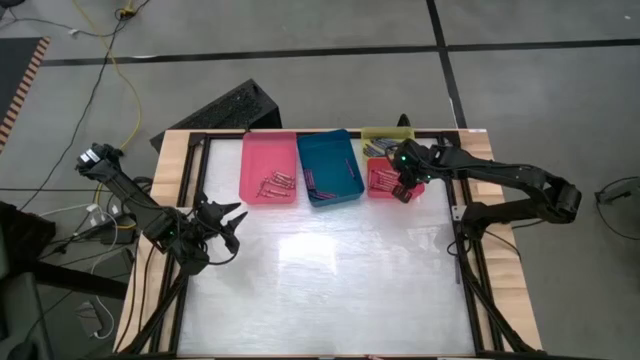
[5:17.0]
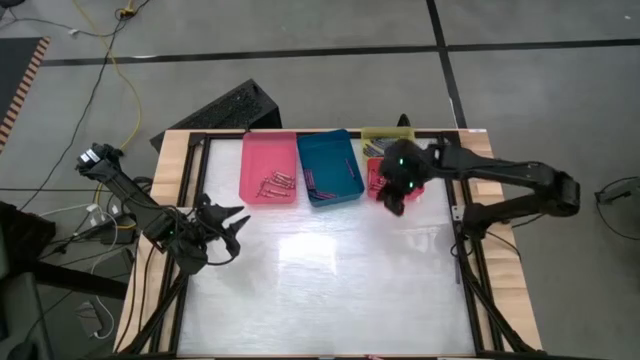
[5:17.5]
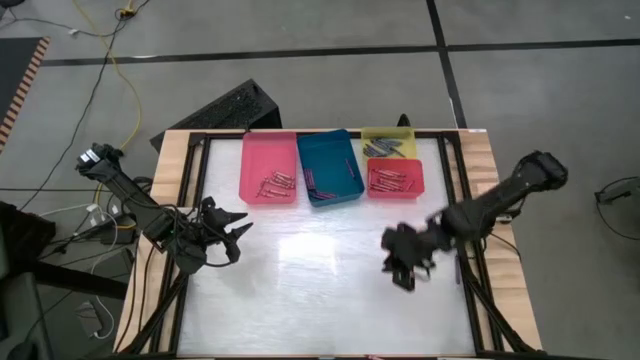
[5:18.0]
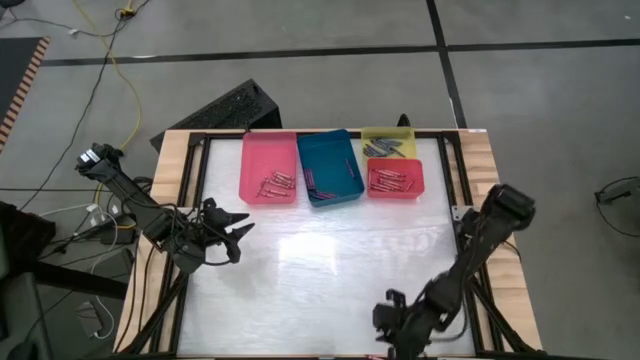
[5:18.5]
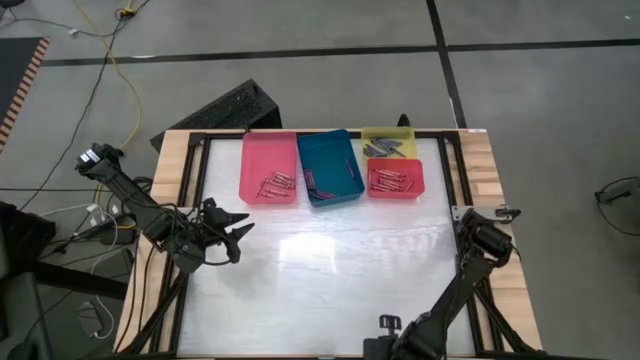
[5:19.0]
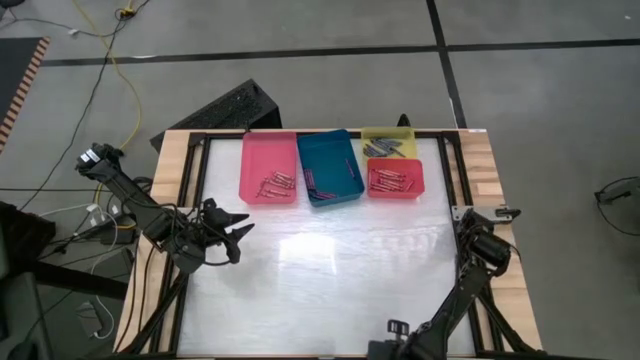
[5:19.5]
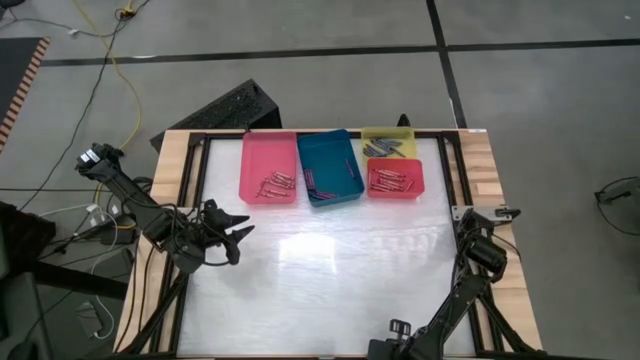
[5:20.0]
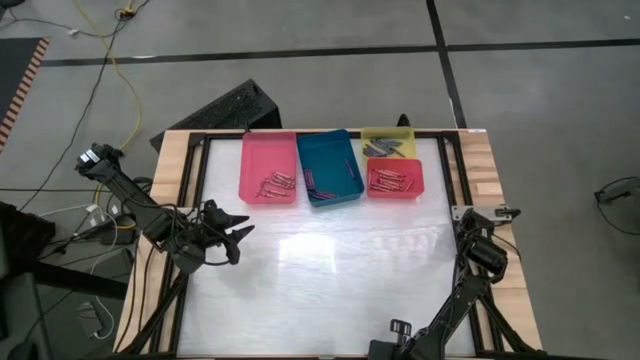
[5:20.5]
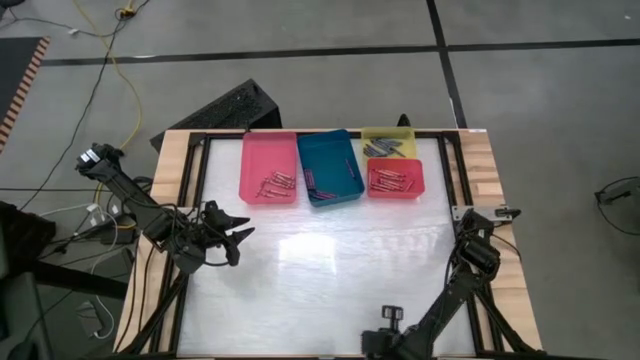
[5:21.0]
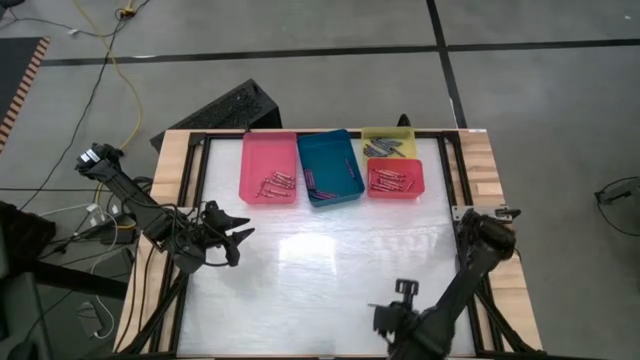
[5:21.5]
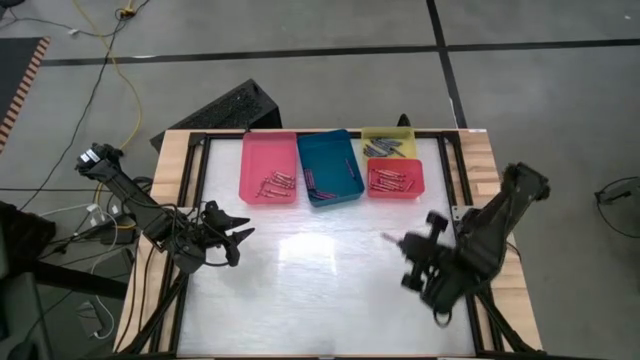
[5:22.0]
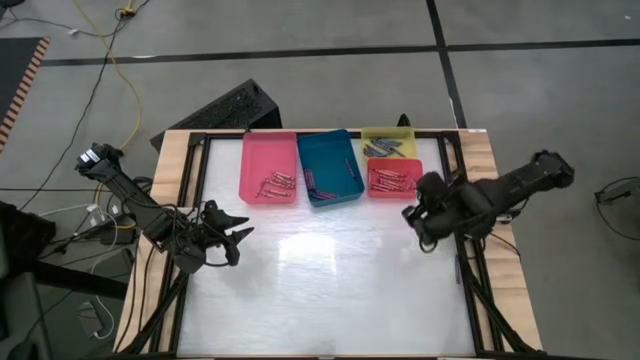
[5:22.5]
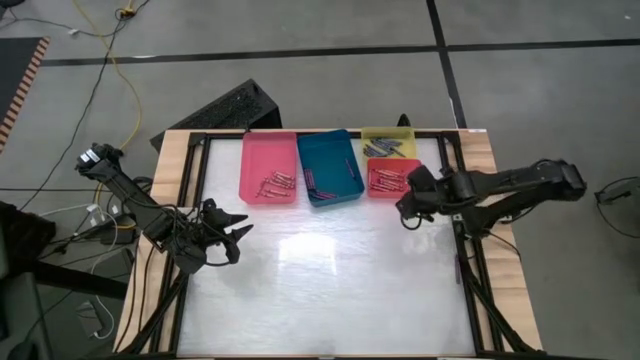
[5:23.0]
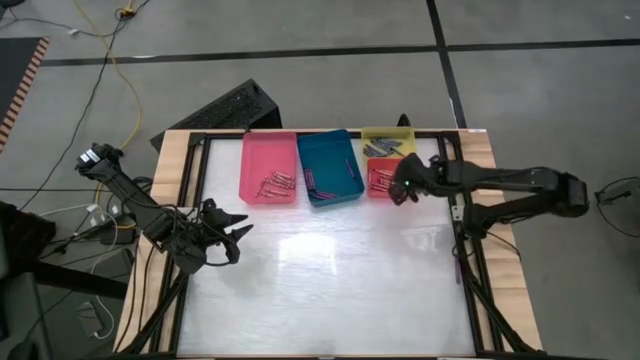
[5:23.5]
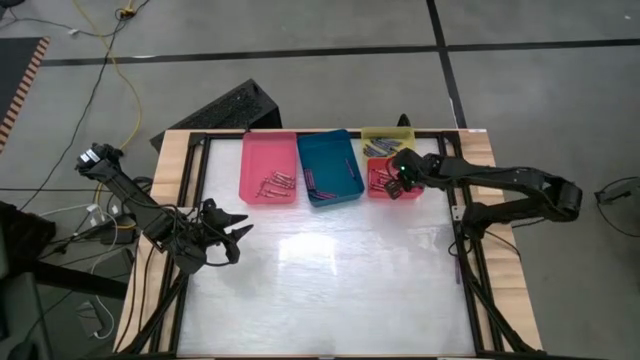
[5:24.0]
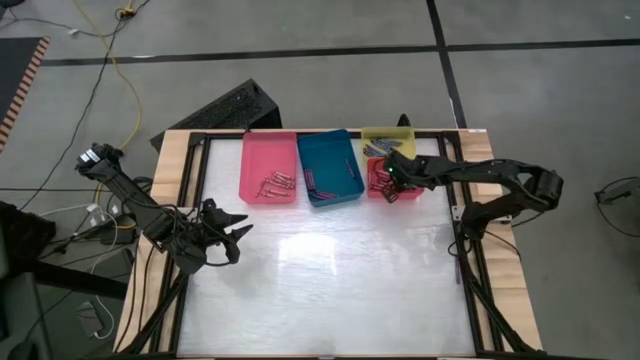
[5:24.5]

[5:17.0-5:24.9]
Task: Sort crayons
Put the red crayon into the red bin

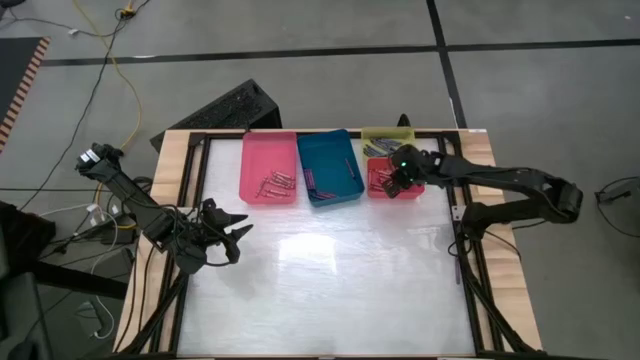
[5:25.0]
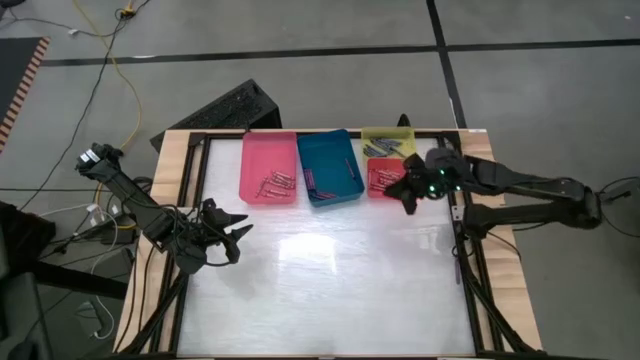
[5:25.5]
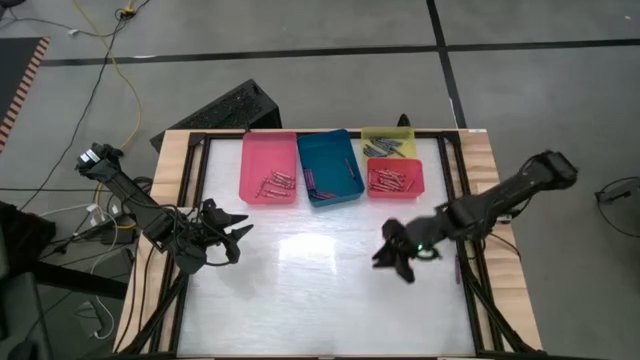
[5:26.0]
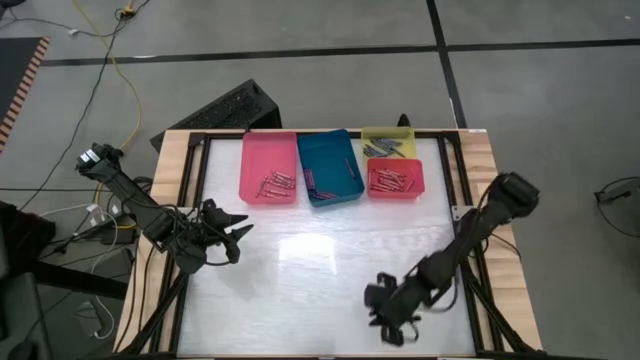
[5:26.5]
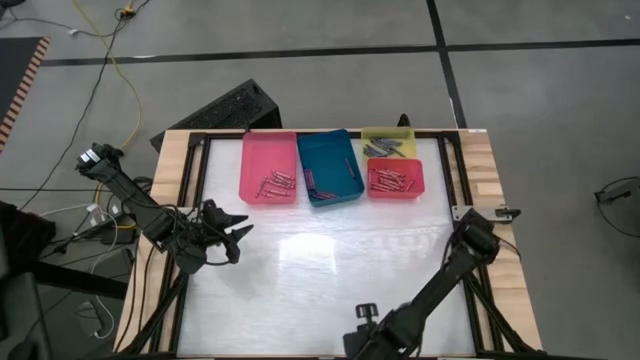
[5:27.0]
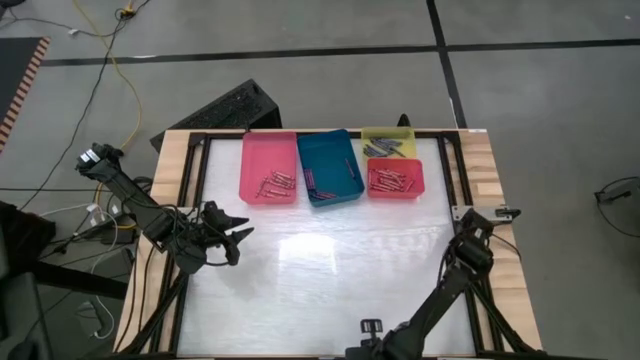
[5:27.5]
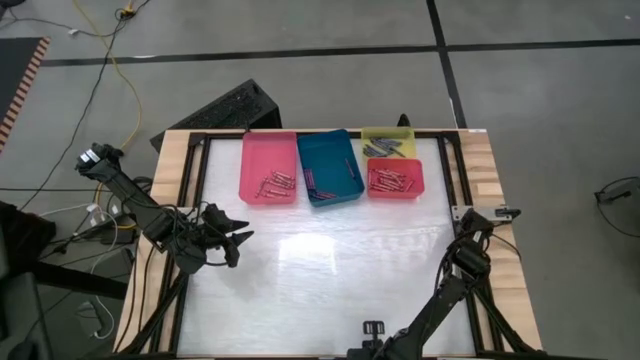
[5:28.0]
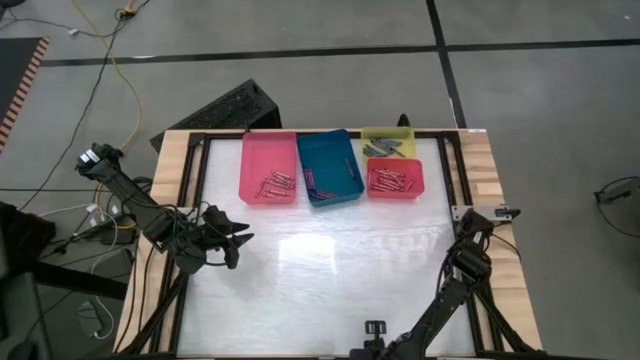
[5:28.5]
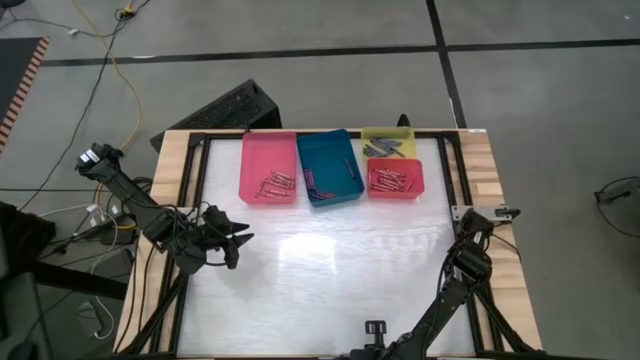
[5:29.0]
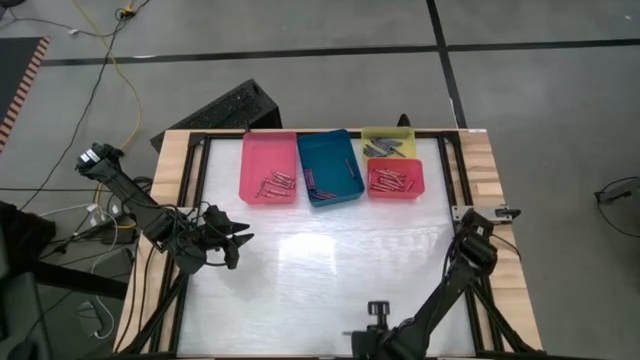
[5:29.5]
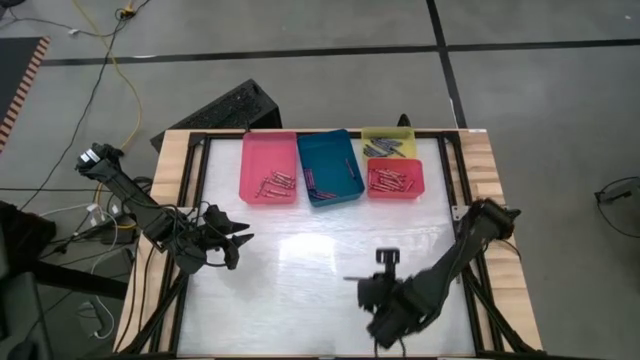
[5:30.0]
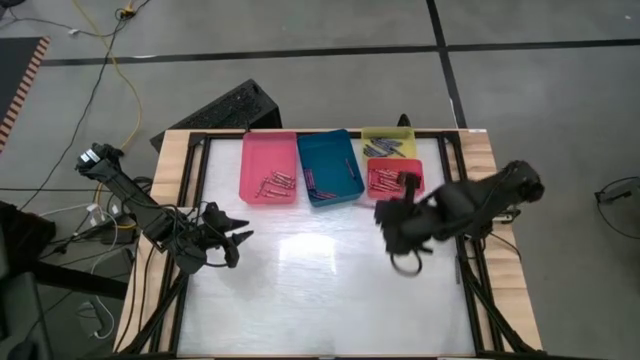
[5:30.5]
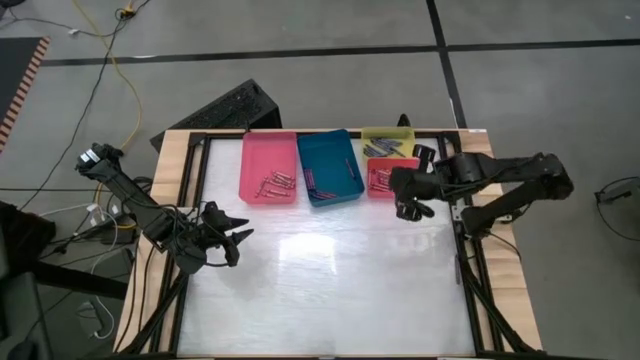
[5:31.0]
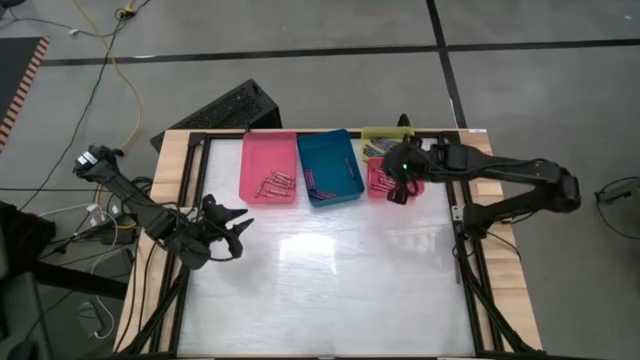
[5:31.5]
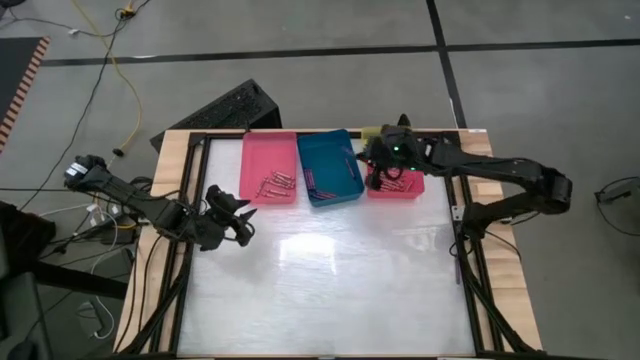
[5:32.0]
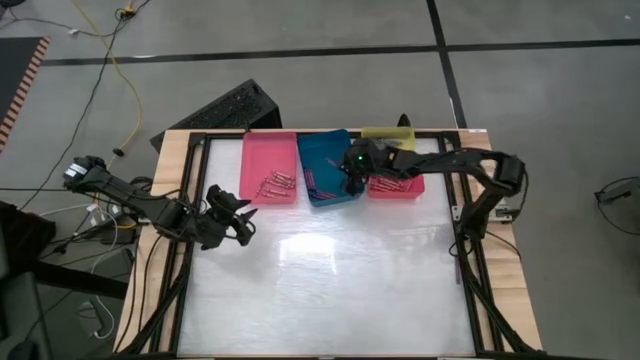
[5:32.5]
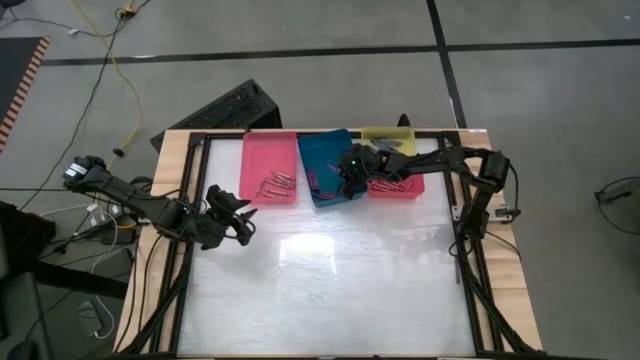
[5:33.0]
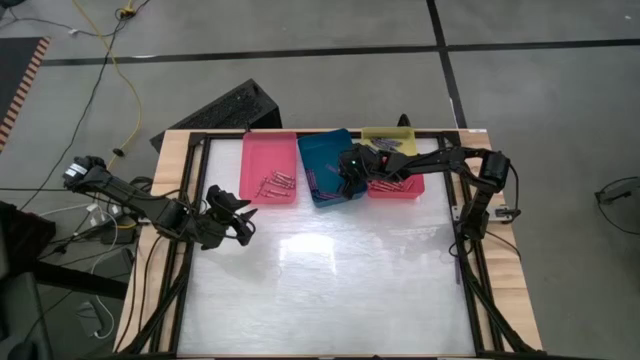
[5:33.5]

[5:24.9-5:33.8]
Put the violet crayon into the blue bin

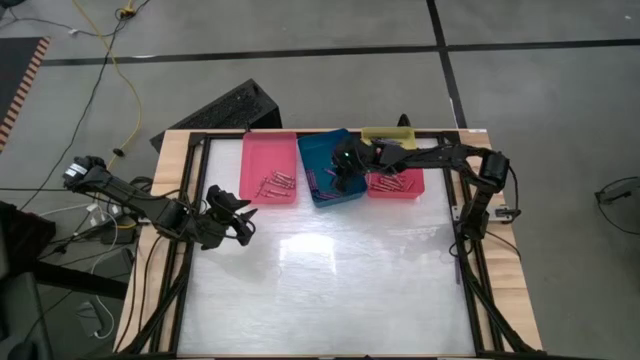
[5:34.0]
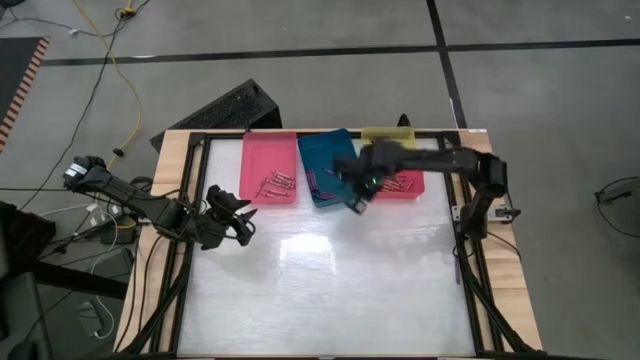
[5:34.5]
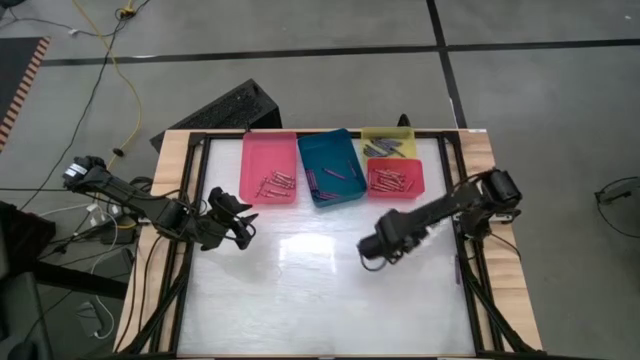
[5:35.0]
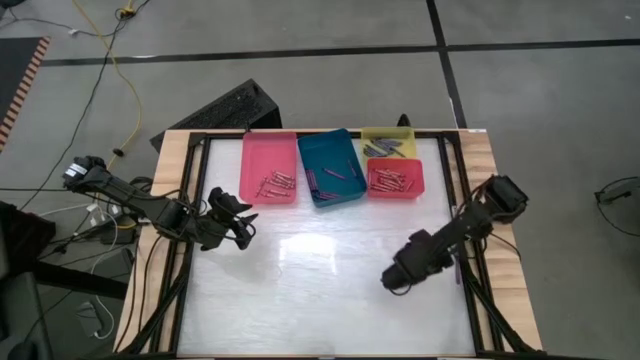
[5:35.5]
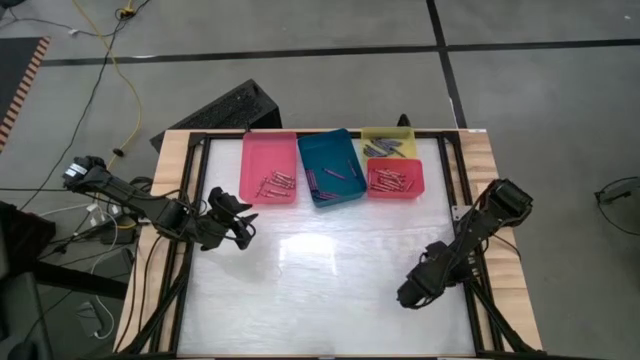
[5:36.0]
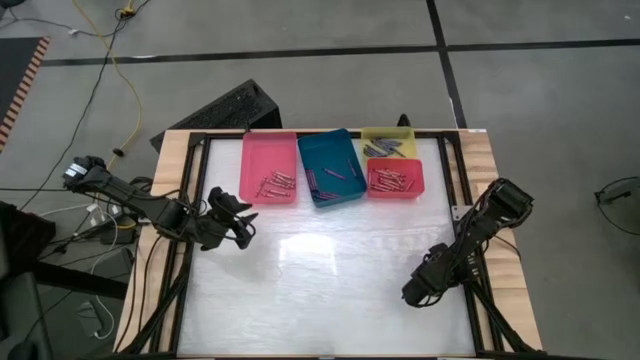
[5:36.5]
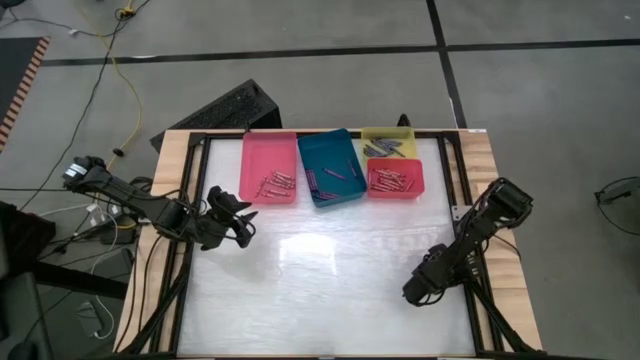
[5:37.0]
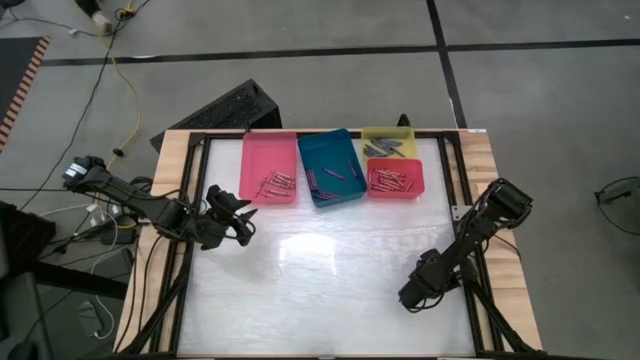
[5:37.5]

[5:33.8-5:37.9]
Put the violet crayon into the blue bin
